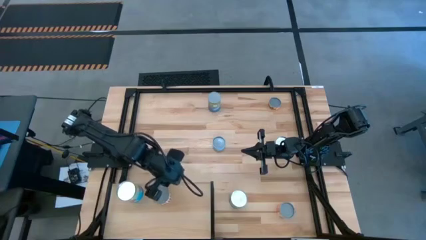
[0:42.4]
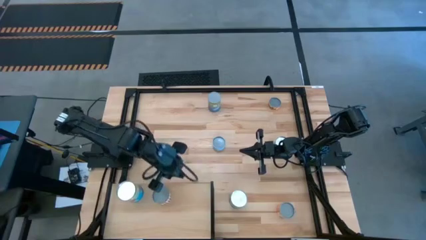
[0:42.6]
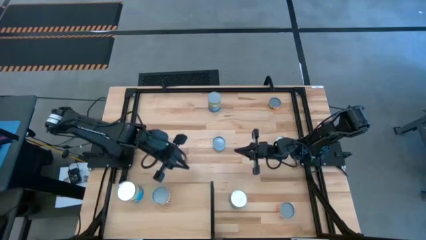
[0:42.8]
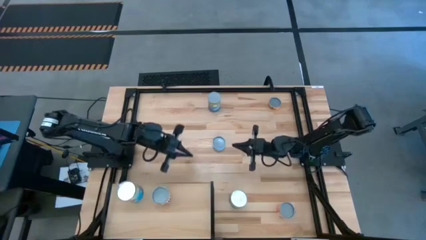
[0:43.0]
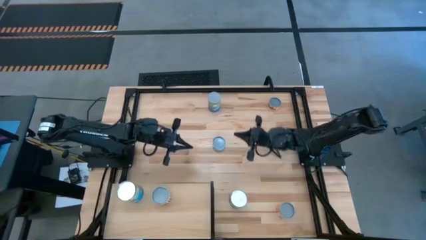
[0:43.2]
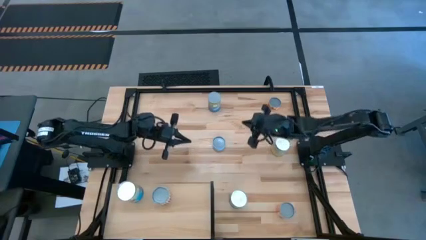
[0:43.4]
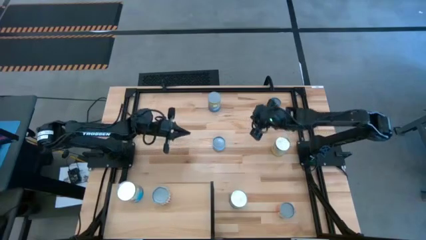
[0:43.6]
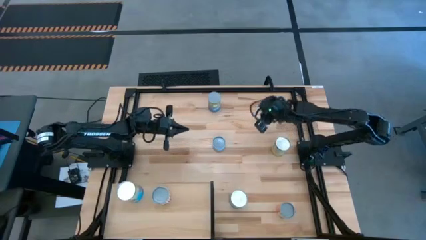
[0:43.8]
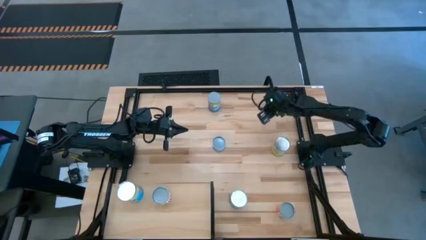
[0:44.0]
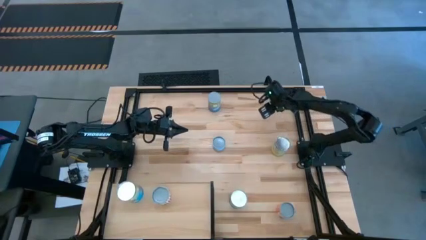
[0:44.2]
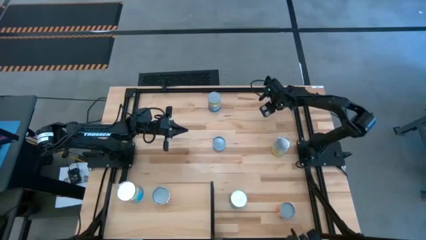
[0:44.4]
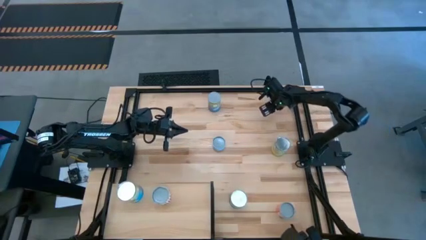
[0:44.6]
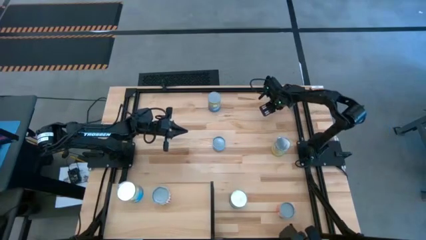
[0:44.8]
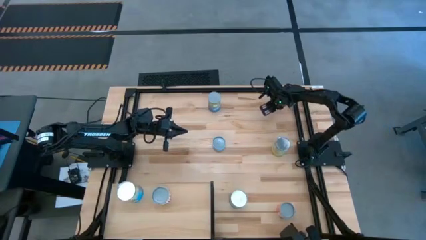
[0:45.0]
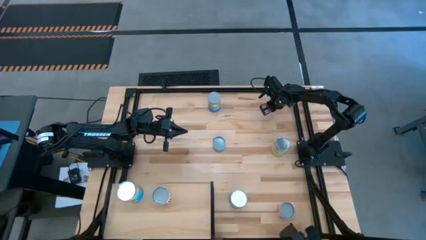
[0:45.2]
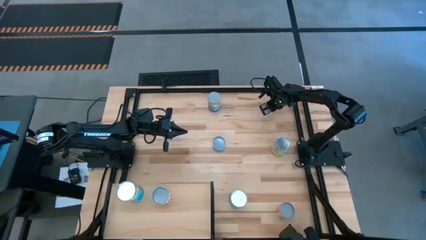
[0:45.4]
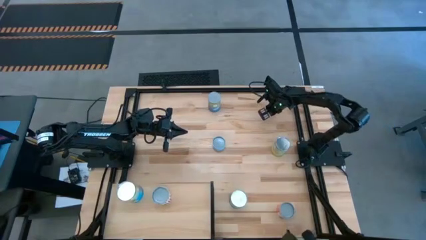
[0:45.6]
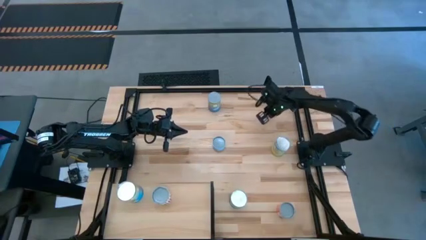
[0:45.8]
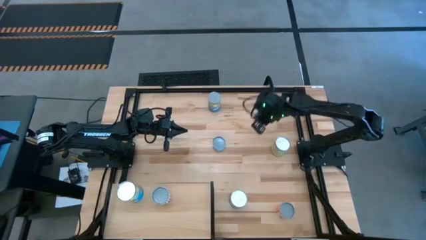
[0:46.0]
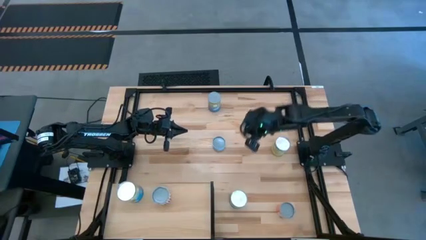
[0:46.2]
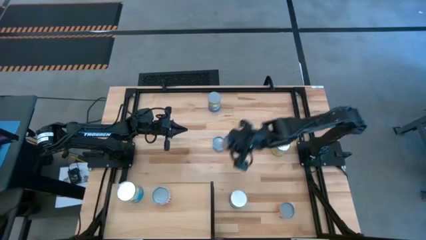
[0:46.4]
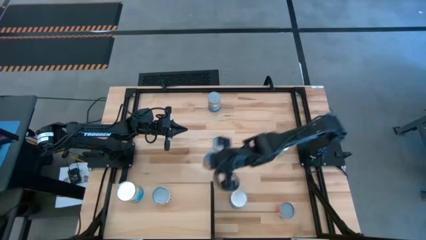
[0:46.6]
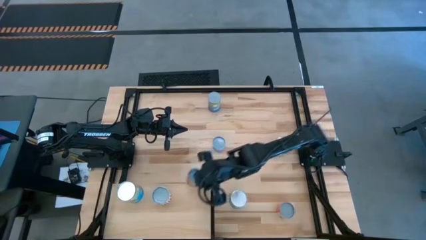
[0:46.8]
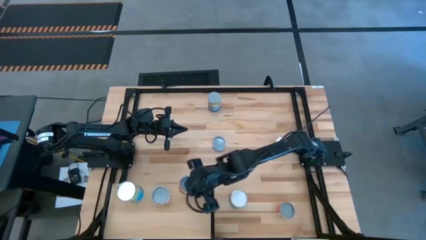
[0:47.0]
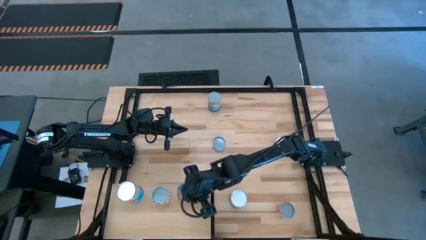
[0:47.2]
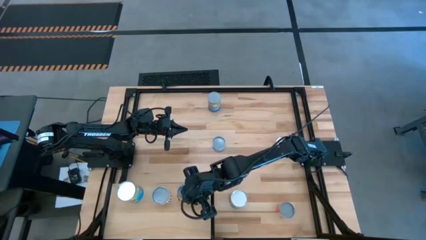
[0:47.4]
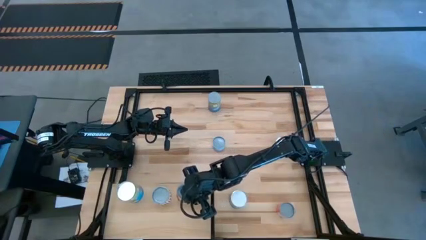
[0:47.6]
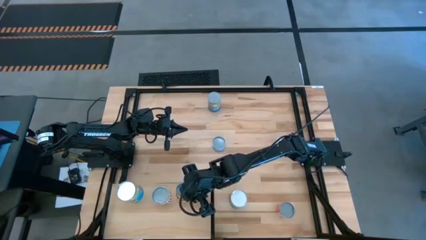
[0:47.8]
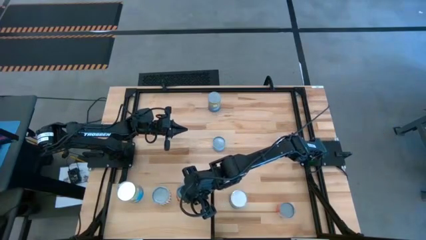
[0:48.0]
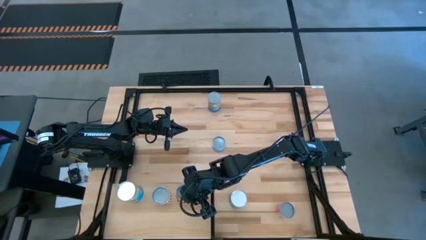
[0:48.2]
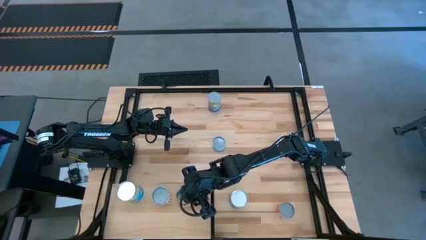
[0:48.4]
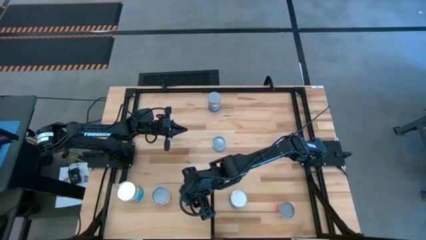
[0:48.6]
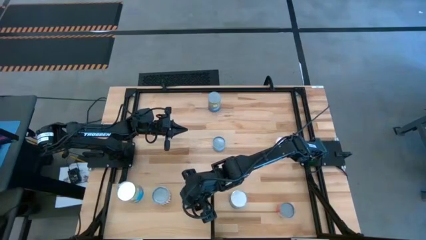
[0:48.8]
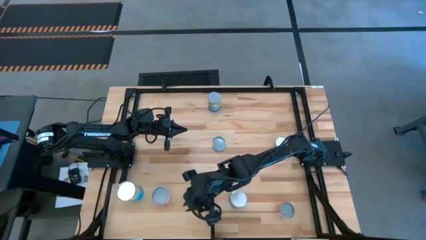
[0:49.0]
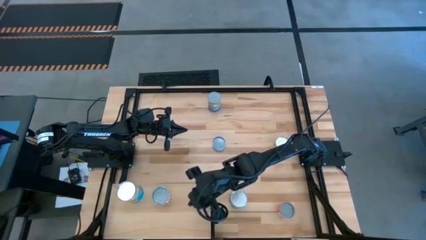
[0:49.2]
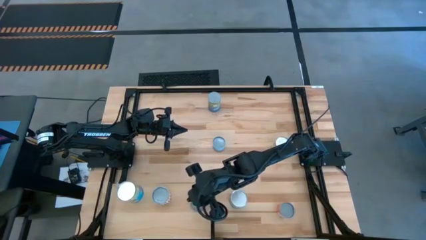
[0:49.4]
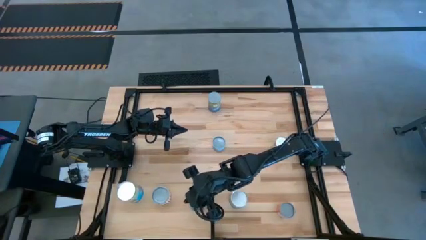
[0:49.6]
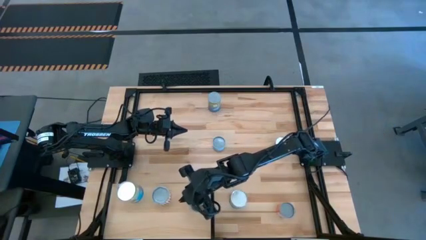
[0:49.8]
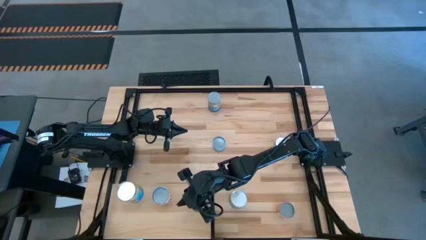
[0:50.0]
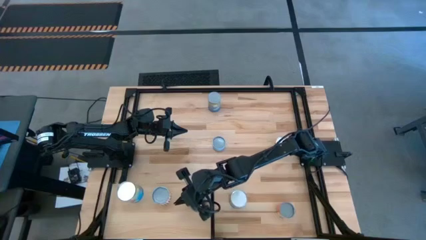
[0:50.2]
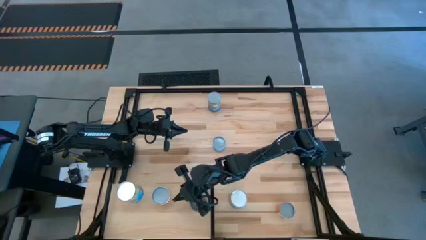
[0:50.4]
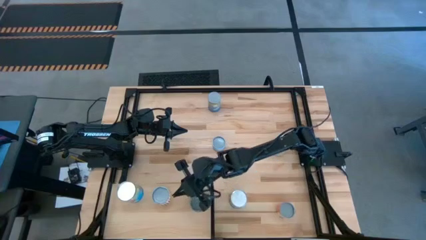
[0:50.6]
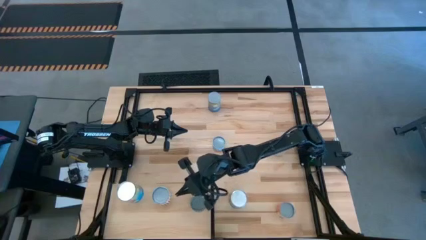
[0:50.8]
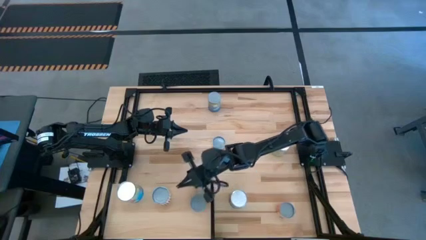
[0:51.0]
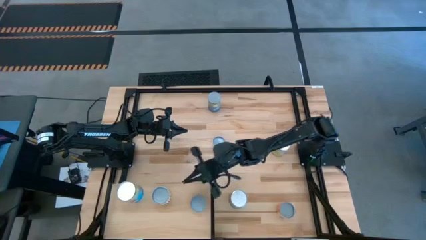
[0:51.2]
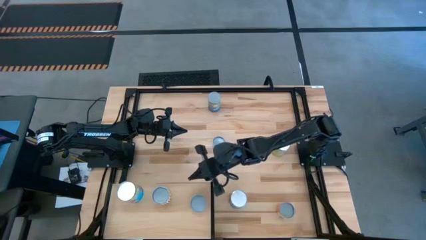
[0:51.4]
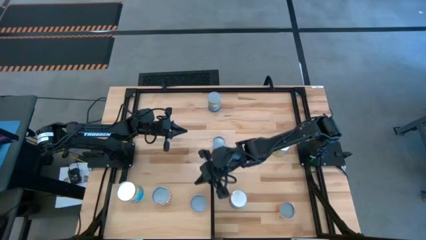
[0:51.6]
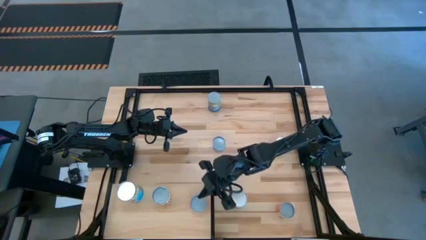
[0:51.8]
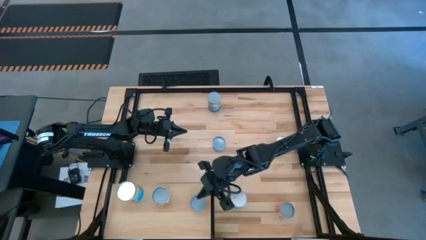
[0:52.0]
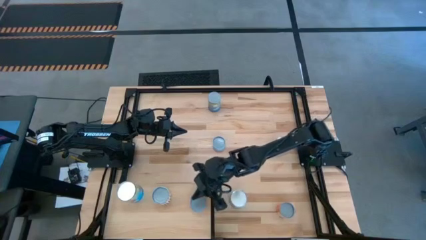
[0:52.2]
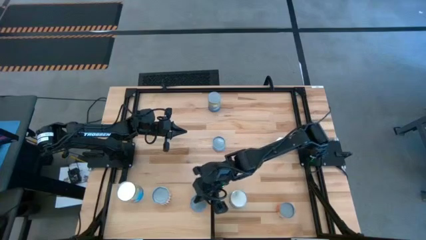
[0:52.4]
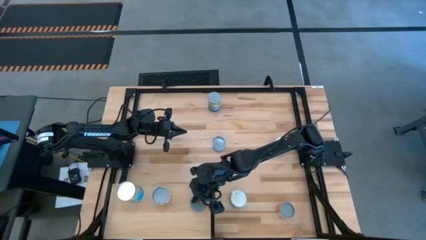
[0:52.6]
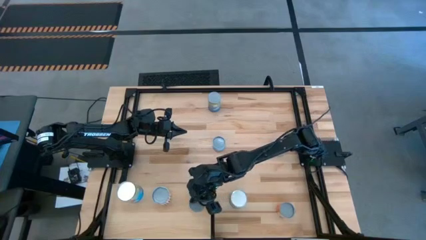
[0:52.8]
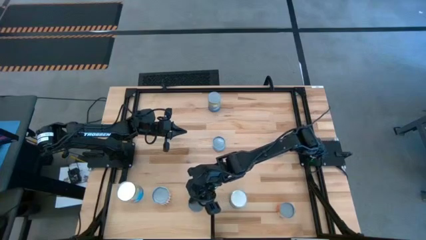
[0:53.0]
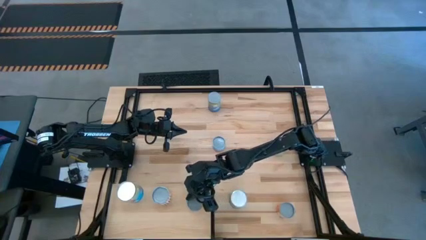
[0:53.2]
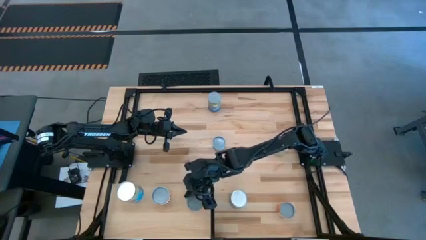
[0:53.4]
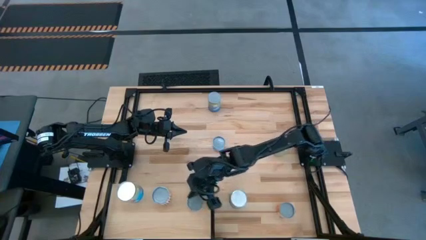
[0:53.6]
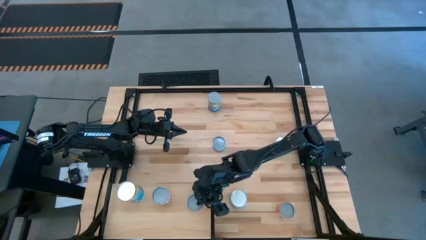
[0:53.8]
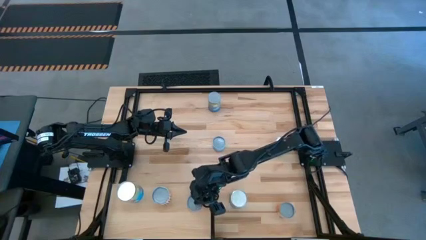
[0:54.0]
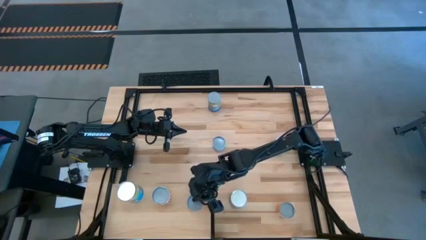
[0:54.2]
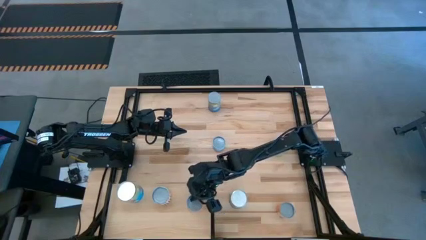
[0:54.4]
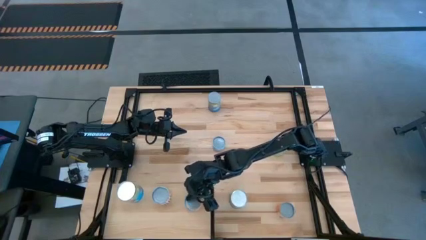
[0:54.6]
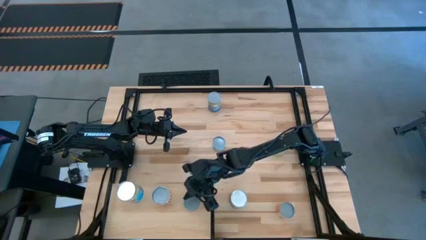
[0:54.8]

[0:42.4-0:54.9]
Task: Pick and place cans onto a shelf
Put the canned pineapple rings on the shelf
